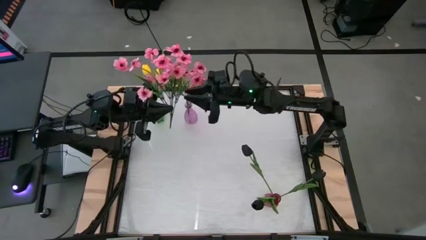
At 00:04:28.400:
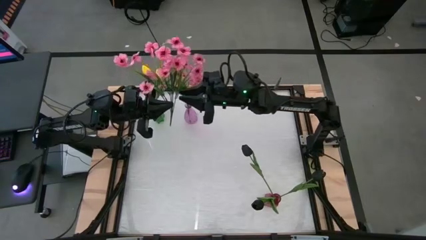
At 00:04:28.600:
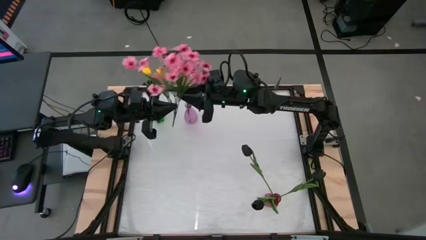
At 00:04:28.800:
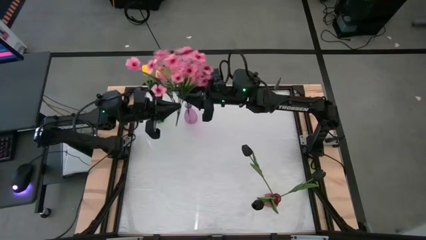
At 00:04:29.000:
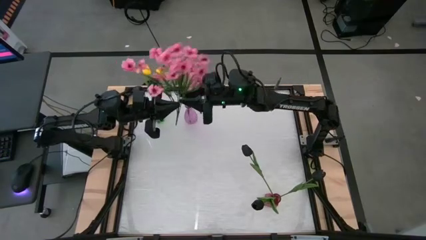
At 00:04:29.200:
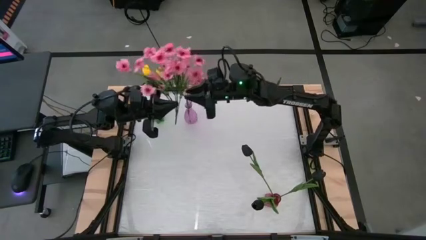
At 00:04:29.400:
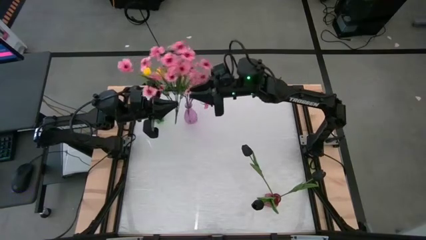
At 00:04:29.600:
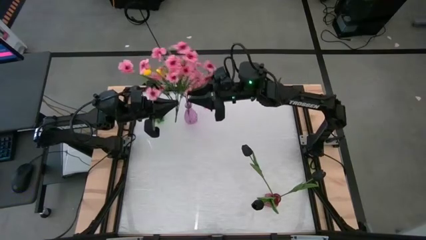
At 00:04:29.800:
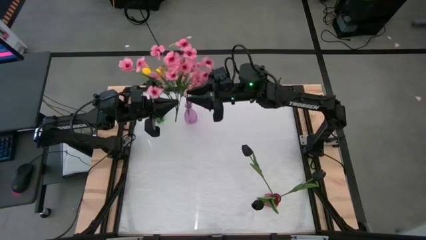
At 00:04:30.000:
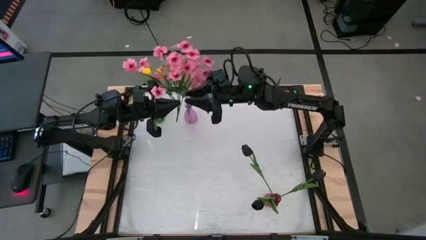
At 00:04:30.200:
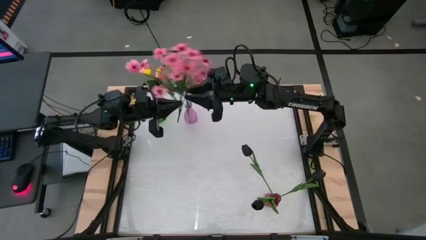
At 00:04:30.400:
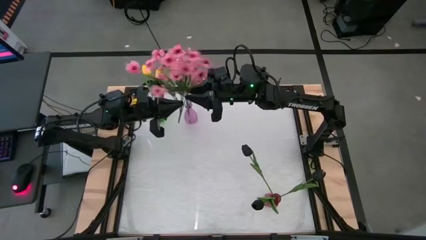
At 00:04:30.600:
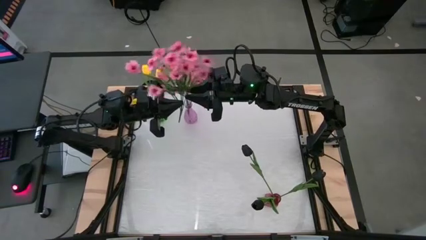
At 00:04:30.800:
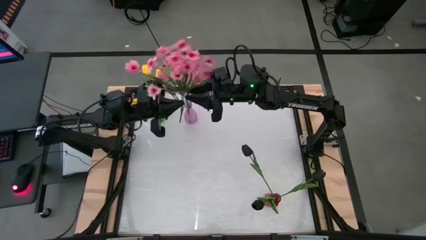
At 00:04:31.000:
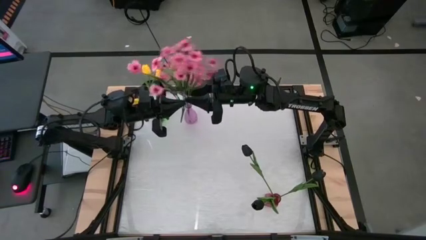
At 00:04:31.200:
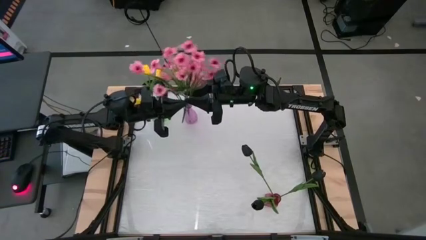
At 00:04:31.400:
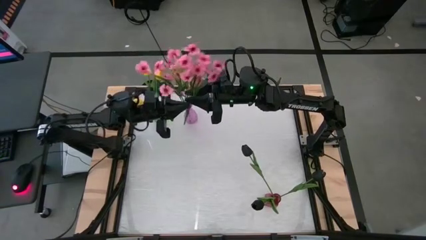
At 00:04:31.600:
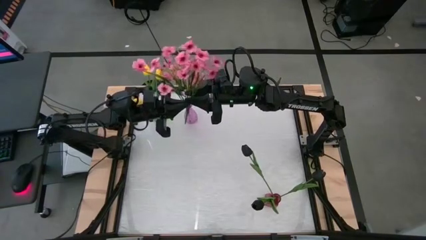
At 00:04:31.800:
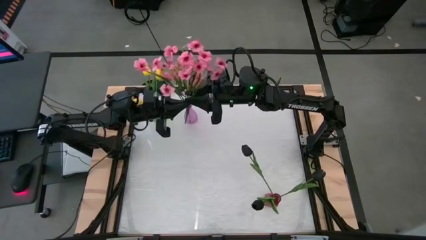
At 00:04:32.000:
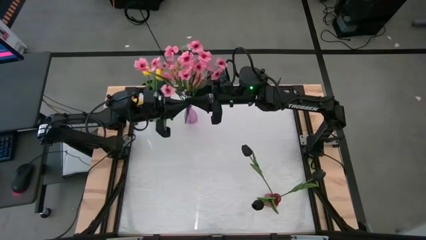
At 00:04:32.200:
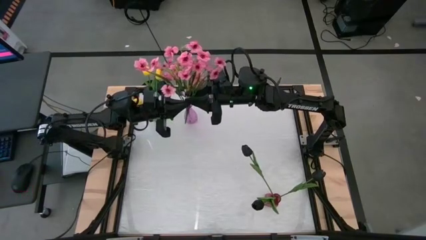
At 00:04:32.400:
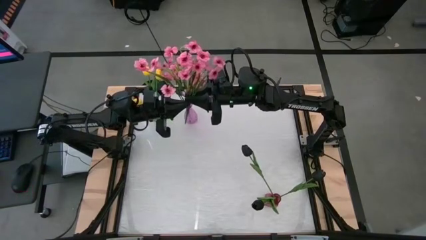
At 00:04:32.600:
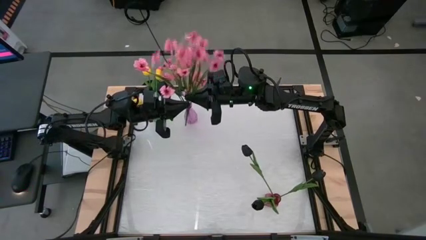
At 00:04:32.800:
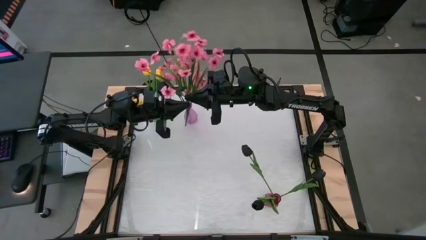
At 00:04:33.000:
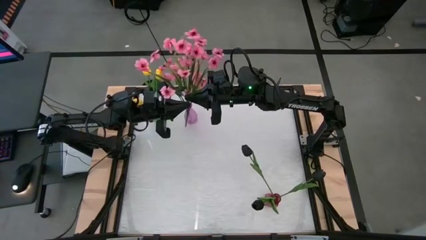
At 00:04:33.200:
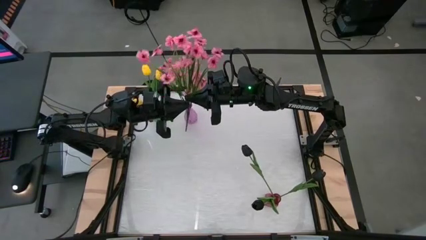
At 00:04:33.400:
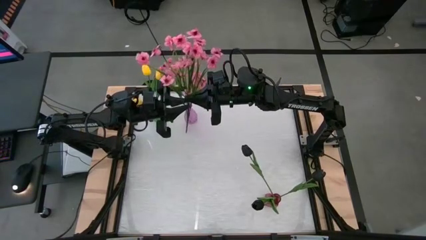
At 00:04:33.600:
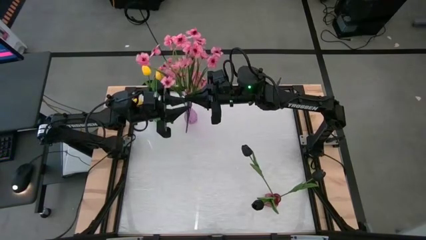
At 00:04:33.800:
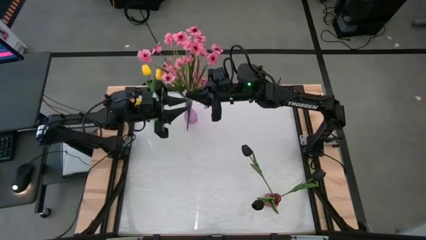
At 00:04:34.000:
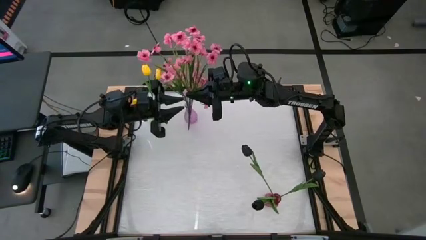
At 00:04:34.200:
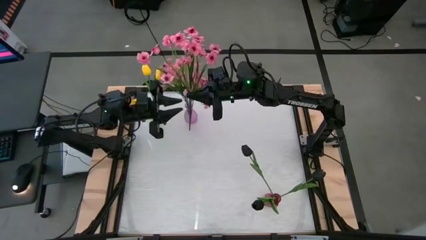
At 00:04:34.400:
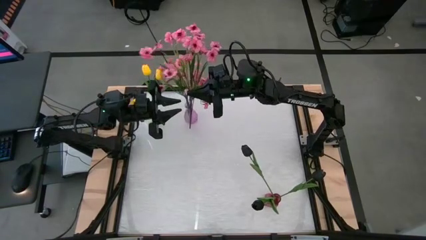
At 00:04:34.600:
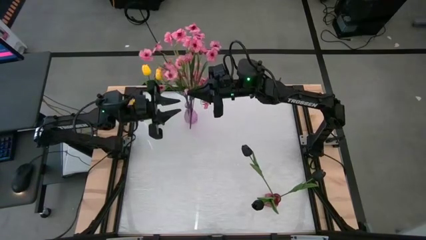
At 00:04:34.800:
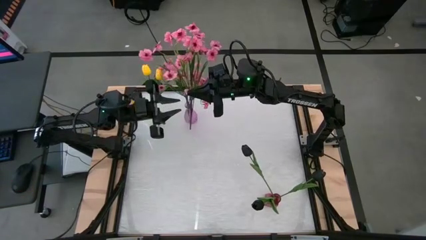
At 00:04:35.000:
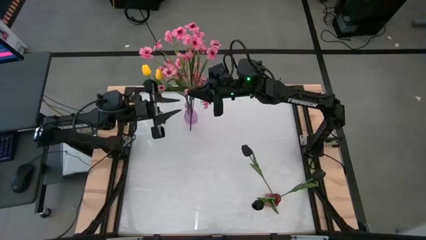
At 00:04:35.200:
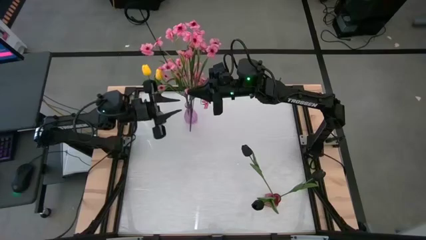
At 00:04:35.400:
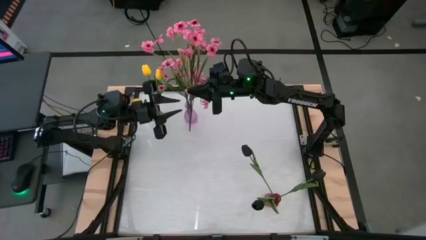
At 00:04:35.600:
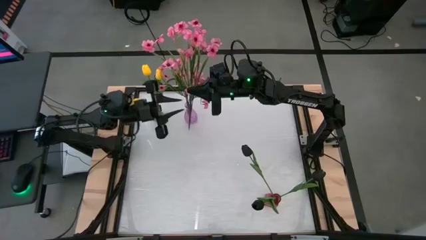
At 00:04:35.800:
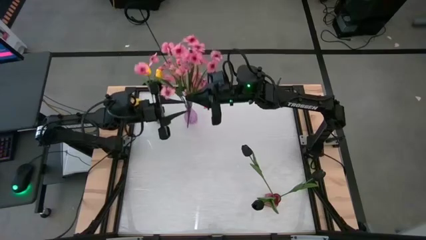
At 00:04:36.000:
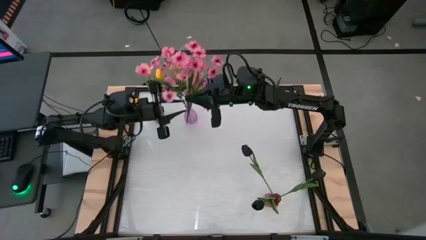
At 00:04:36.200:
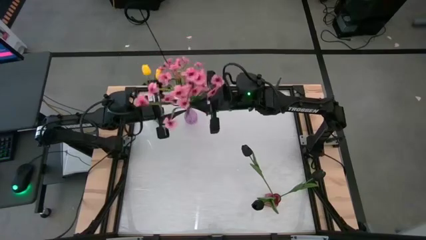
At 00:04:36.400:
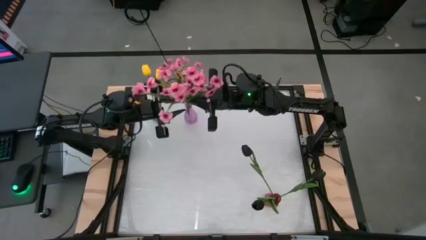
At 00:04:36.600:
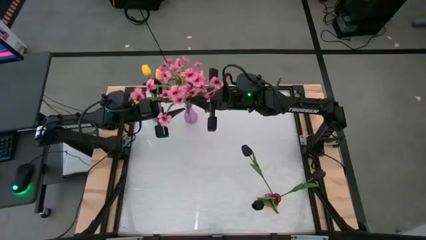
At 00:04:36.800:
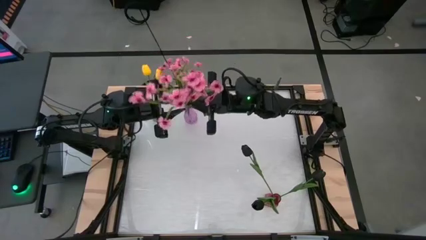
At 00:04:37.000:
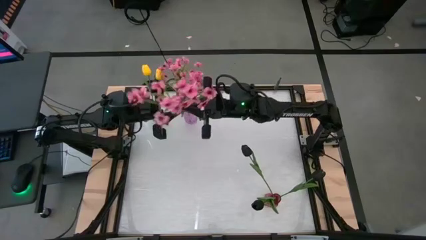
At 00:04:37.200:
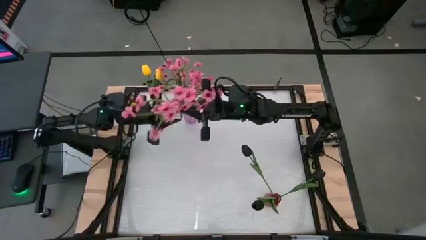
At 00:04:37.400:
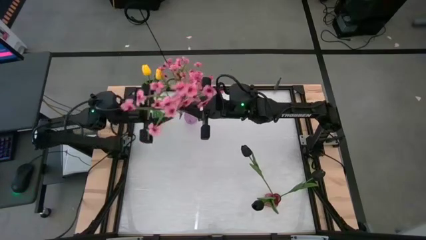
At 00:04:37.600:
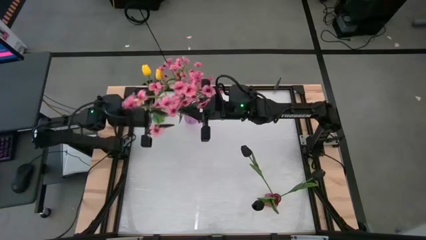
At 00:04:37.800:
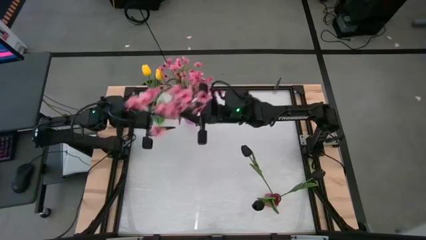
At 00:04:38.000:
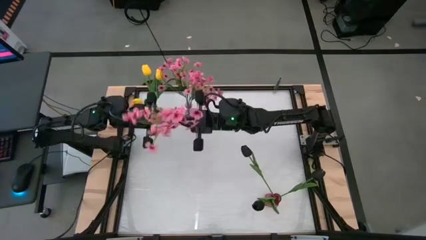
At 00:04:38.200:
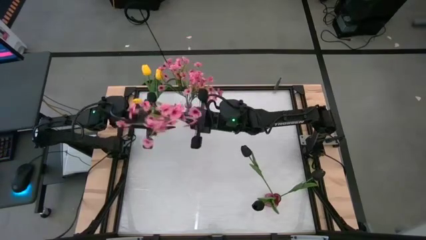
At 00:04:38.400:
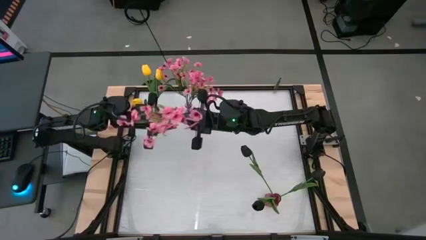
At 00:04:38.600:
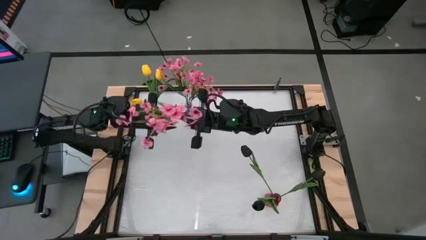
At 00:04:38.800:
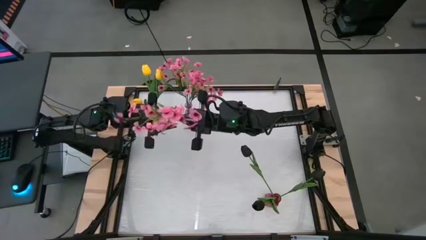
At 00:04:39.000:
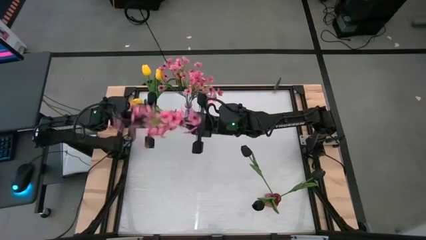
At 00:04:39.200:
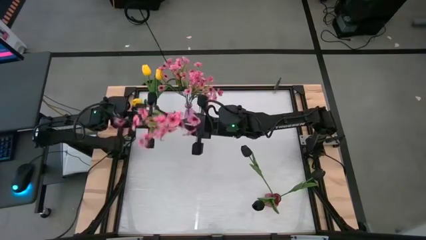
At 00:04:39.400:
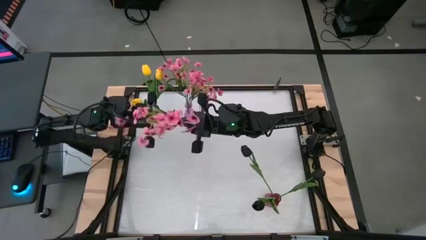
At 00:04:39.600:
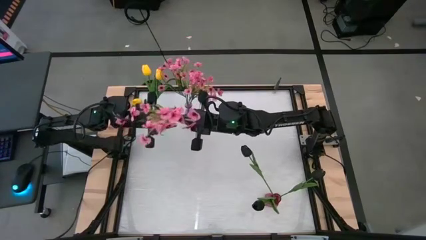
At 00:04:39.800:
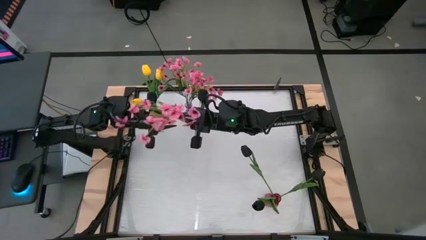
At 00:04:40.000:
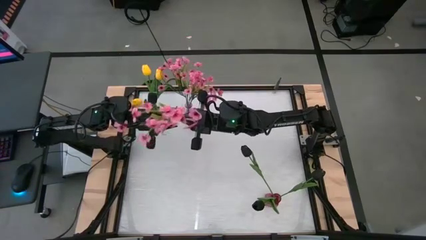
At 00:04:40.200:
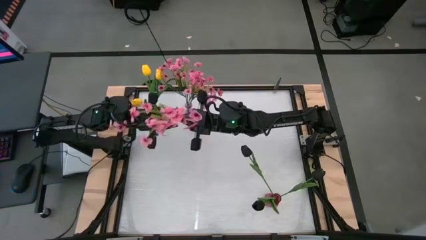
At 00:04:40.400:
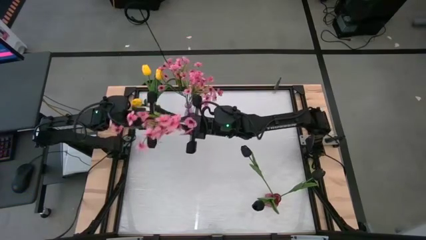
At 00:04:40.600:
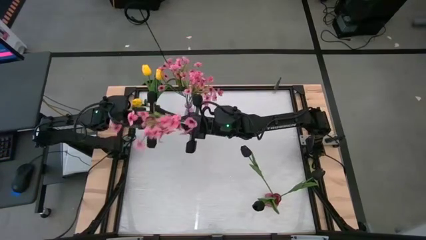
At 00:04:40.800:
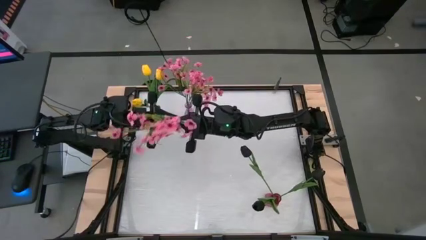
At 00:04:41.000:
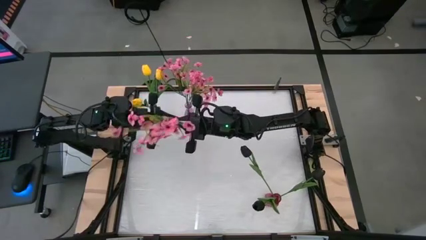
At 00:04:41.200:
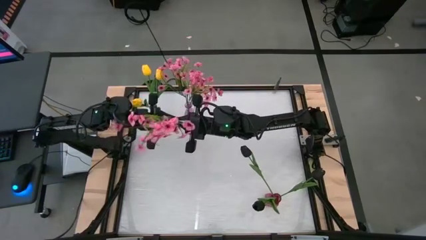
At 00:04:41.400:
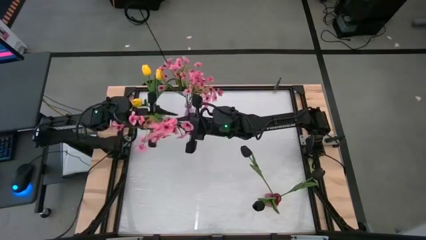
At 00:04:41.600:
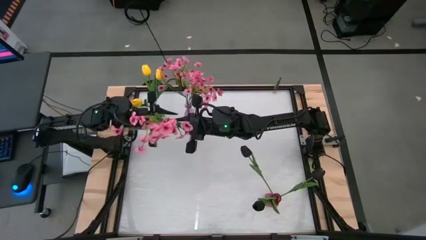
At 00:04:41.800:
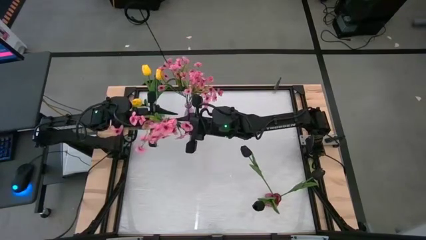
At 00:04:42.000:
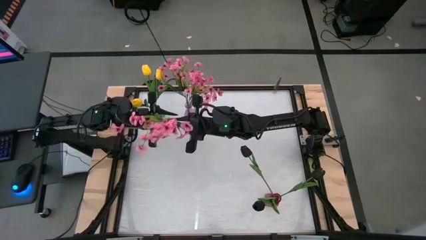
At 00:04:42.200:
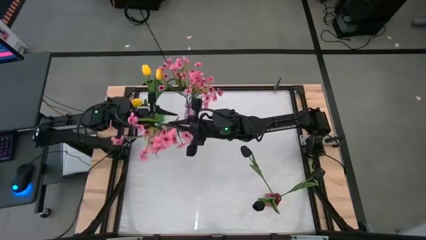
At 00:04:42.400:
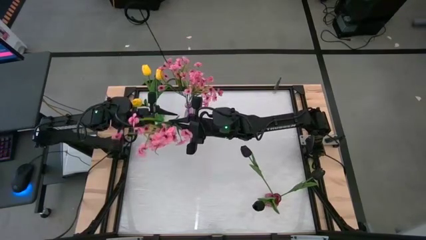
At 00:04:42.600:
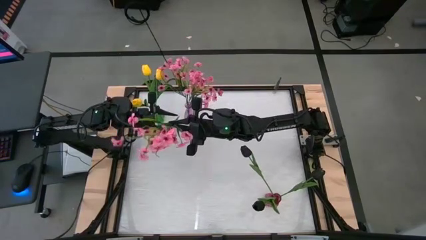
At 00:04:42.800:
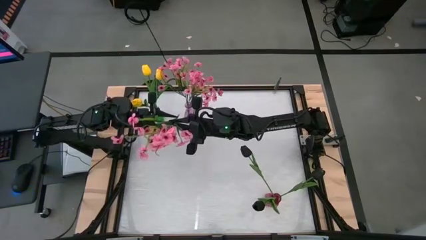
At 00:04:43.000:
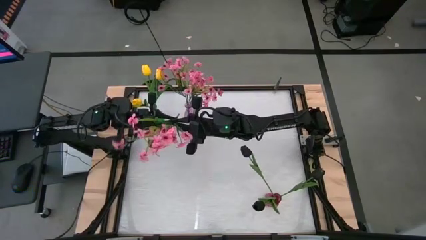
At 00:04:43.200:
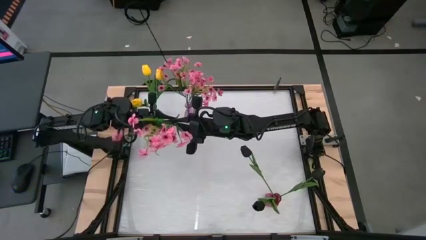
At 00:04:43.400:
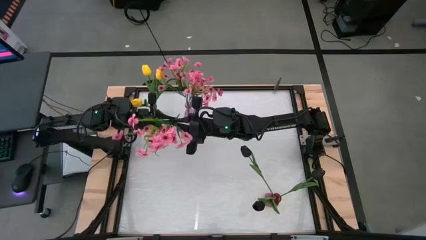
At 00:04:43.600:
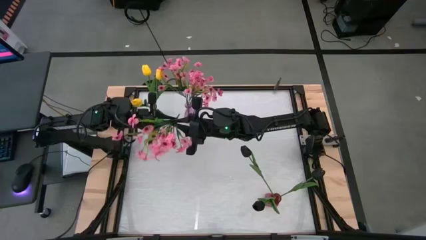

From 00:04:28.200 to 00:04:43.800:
Task: Sort flowers into vase by color
Put the pink flowers into the purple vase

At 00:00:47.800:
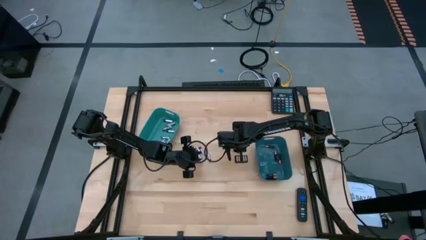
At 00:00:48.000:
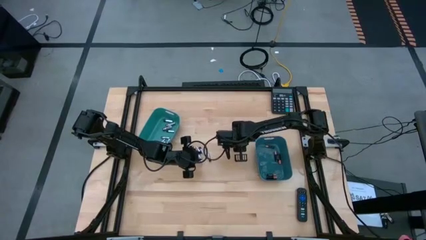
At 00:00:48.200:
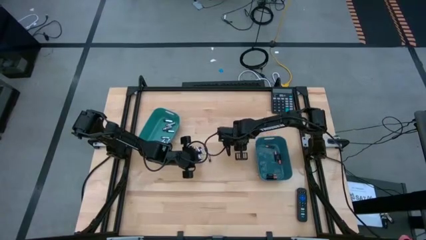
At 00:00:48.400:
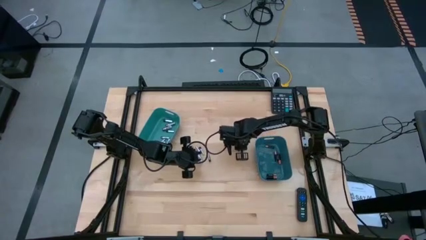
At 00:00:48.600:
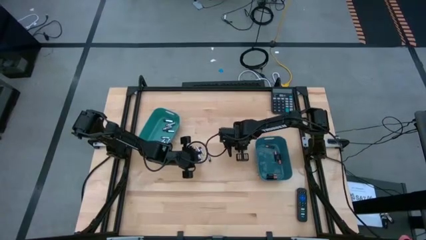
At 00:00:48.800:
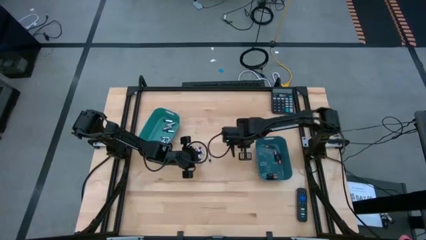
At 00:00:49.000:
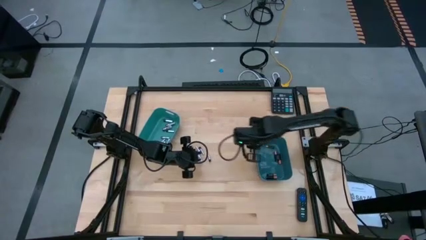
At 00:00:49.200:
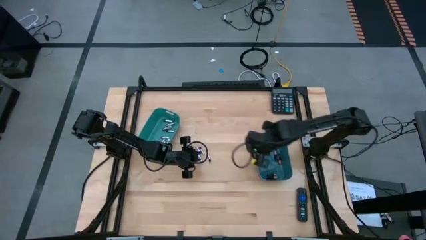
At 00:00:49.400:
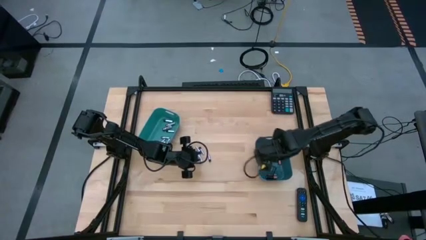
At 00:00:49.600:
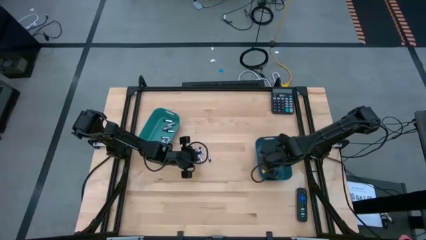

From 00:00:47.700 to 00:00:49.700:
Task: Sort batteries
Put the black battery into the blue bin
